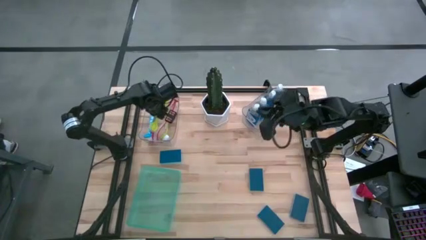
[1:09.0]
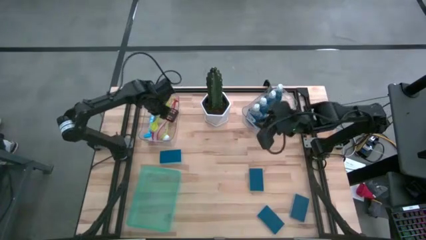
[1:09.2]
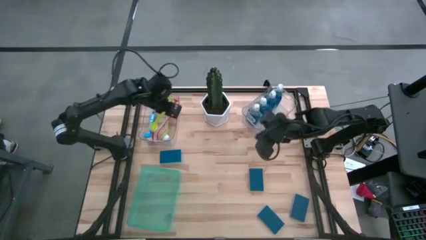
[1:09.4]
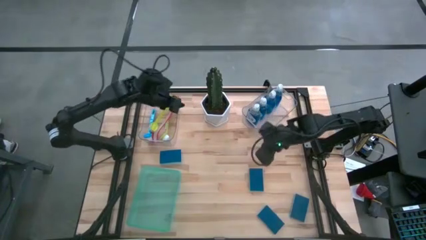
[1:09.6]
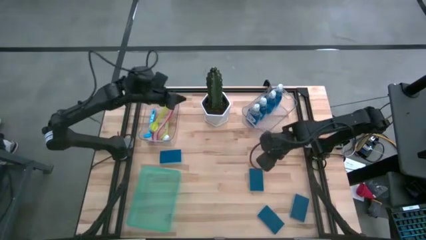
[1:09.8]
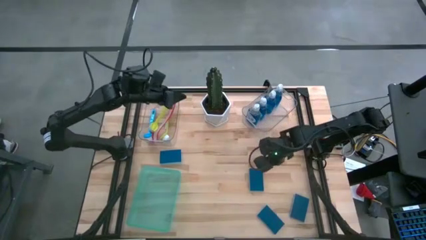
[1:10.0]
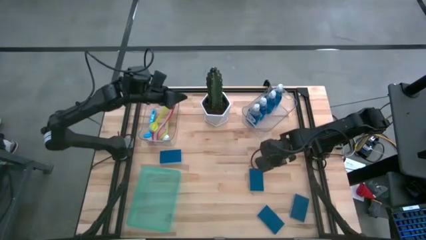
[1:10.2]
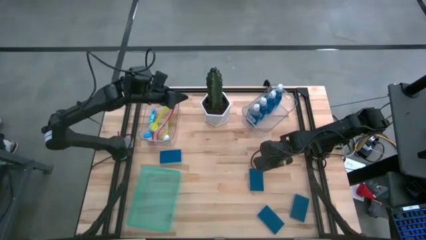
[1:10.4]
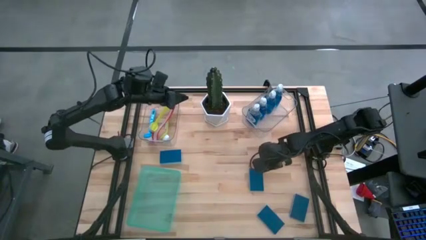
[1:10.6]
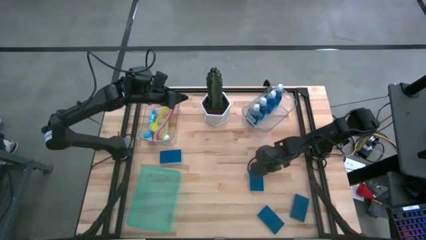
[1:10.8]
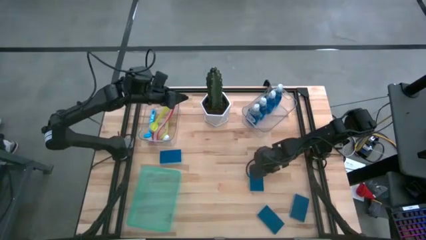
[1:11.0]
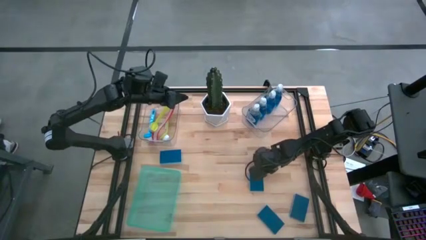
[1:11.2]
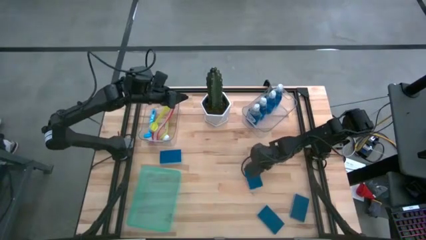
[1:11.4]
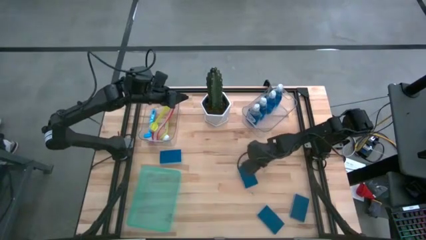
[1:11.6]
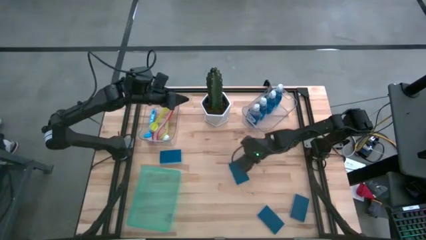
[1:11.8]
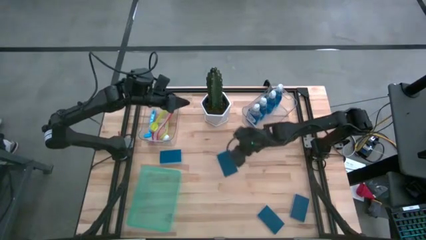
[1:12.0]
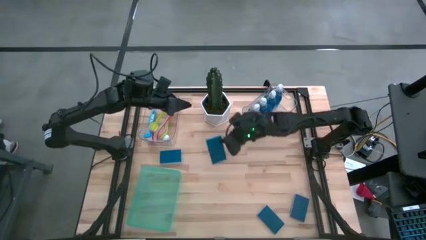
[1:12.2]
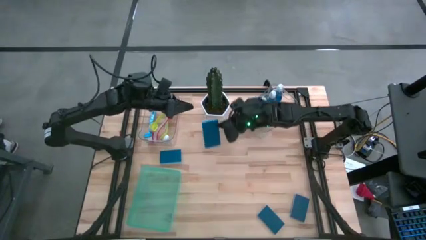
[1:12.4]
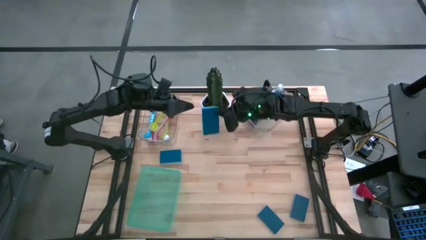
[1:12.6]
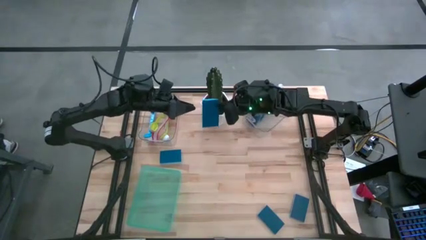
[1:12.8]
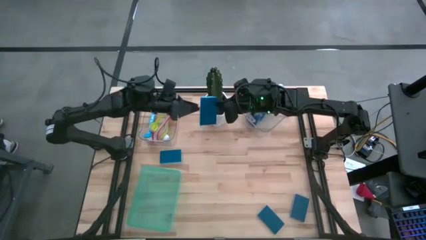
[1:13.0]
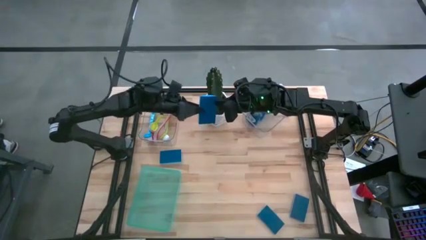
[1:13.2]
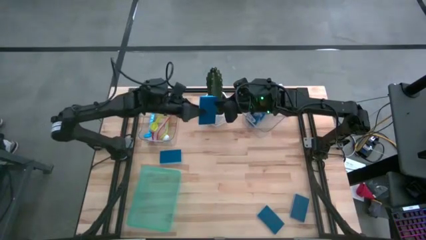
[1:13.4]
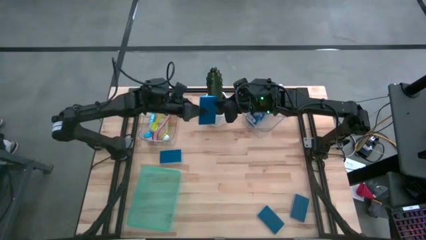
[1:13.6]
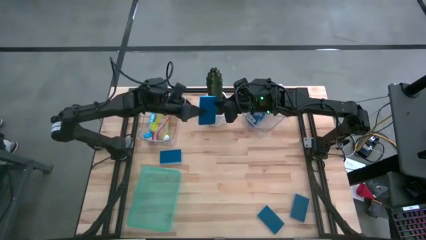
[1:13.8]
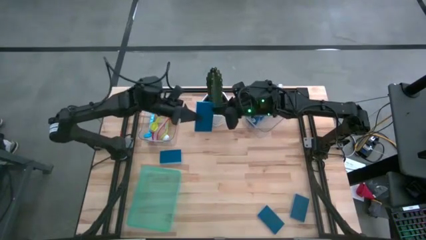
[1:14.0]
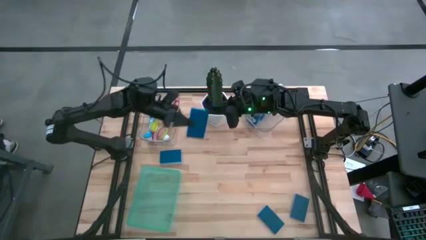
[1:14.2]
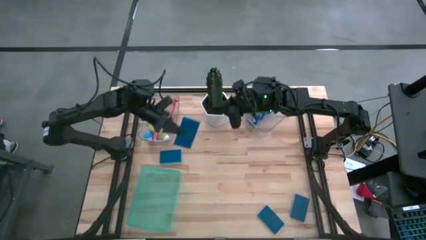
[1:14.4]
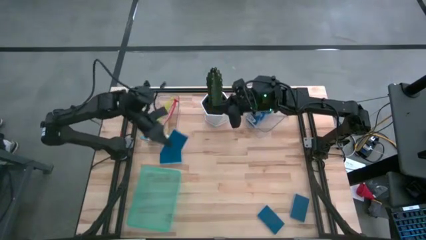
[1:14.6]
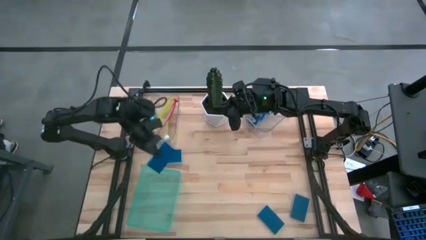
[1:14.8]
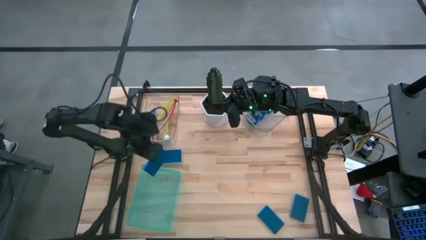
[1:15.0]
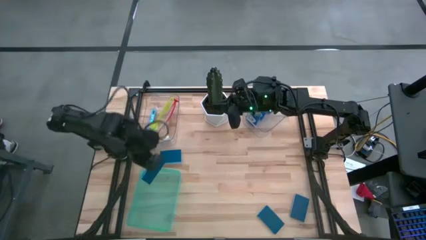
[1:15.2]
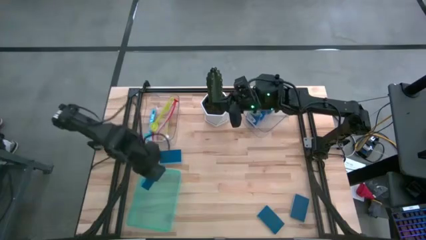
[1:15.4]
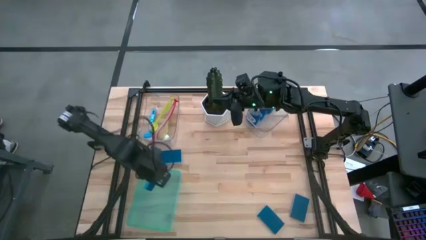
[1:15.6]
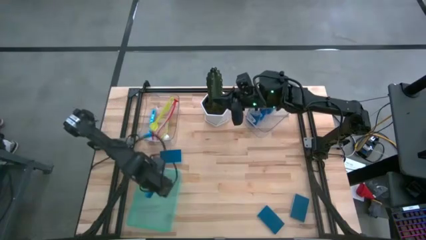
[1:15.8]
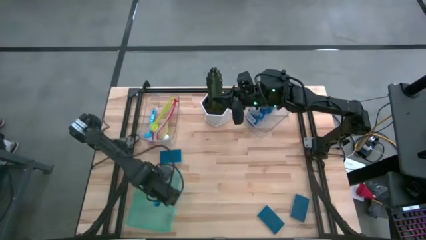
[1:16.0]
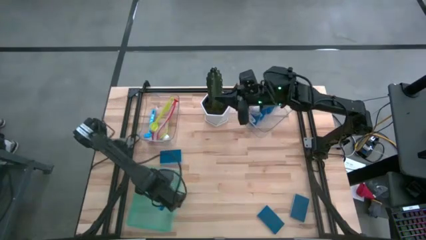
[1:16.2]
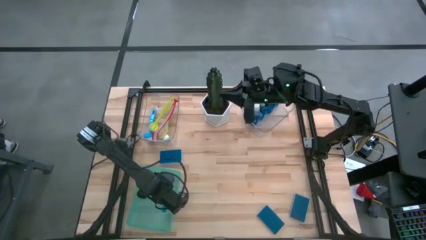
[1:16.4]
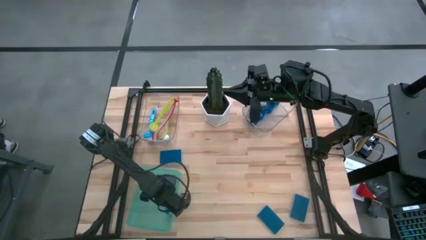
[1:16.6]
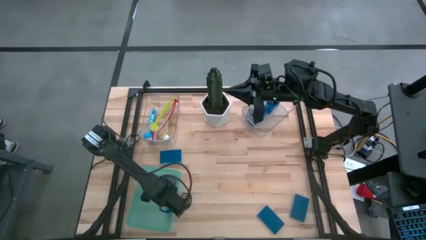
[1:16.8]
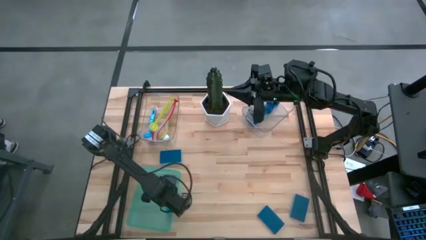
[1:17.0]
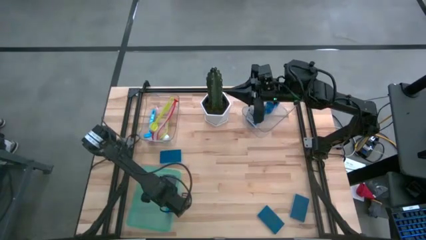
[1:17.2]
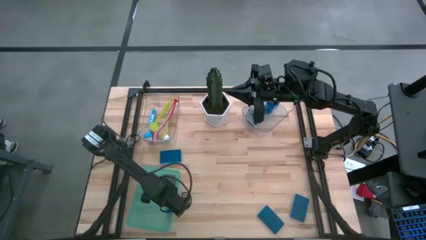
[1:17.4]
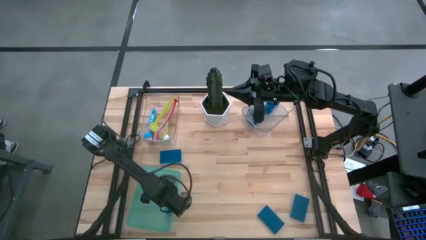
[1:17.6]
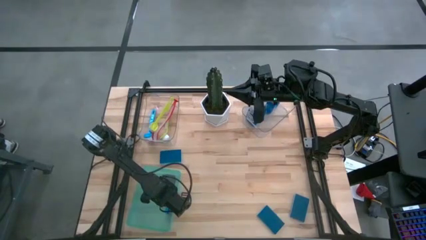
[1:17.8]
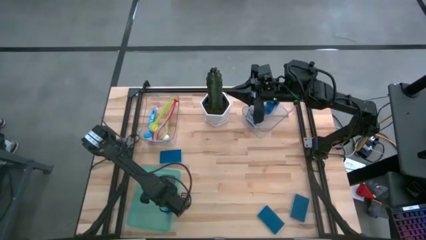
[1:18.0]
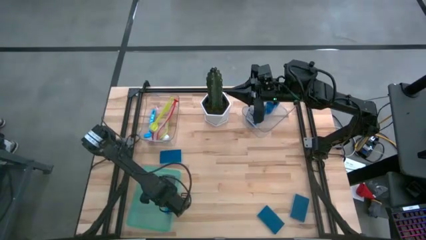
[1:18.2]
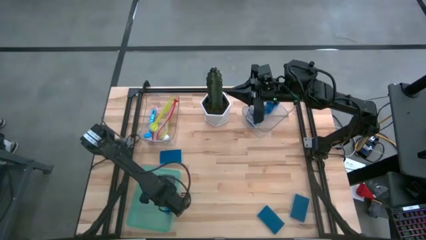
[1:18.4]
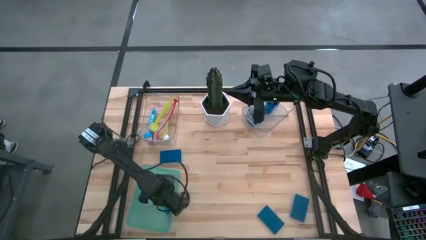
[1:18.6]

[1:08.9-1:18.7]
Task: Pick & Place Kitchen Sink Supplies
Put the sponge into the green bin

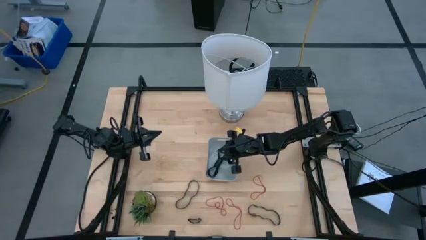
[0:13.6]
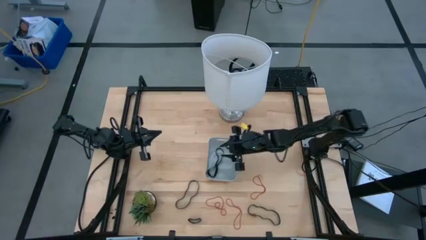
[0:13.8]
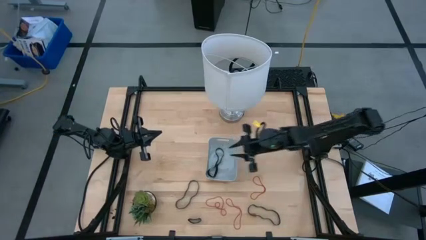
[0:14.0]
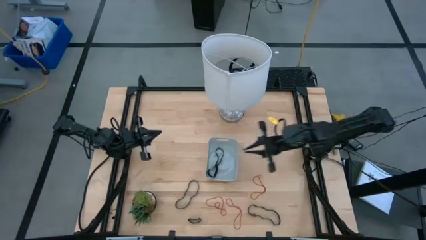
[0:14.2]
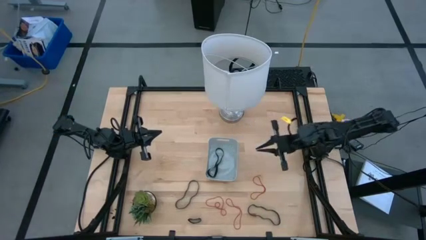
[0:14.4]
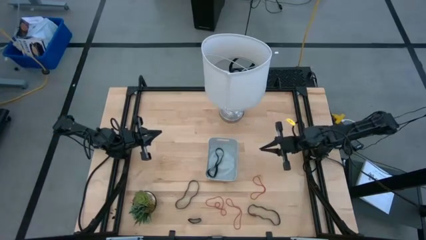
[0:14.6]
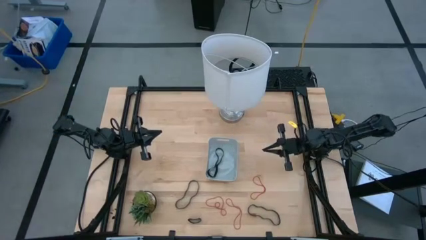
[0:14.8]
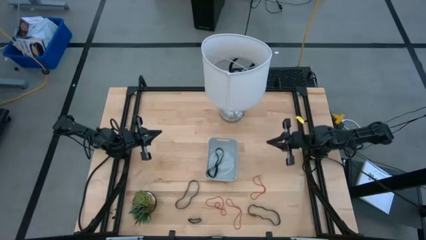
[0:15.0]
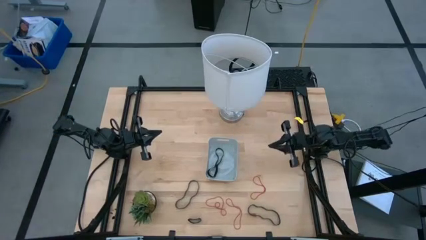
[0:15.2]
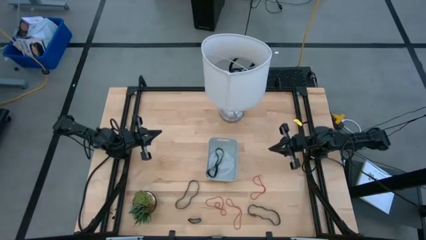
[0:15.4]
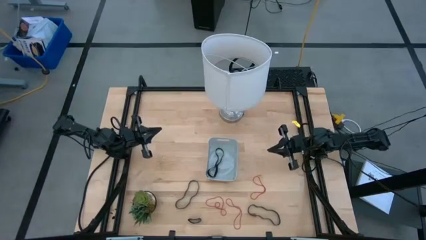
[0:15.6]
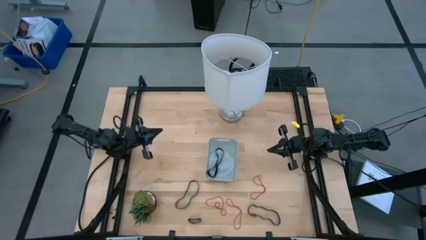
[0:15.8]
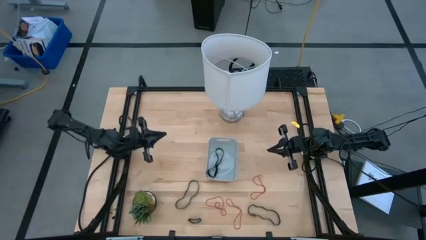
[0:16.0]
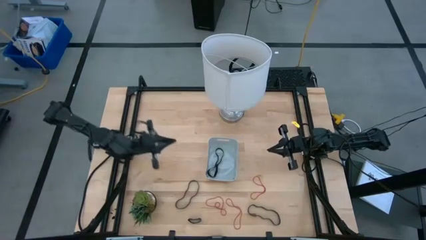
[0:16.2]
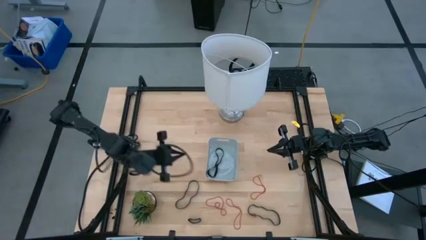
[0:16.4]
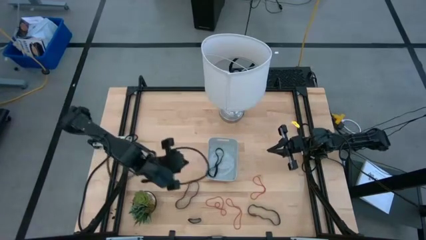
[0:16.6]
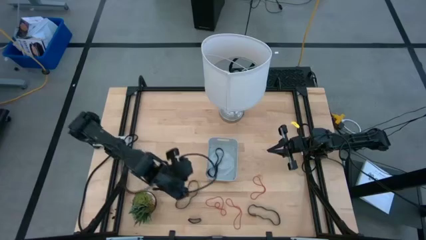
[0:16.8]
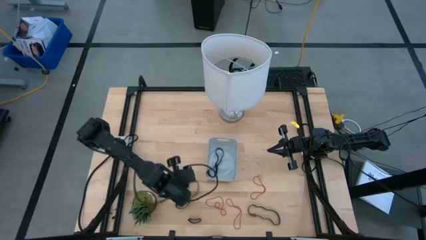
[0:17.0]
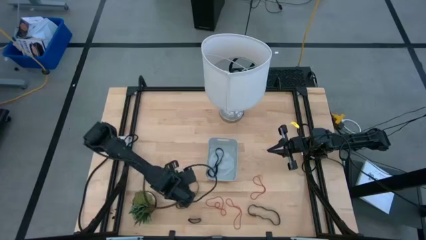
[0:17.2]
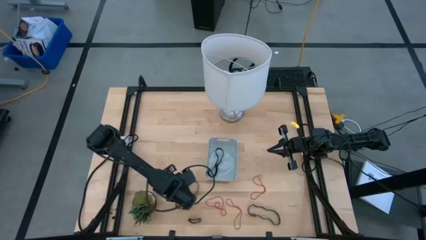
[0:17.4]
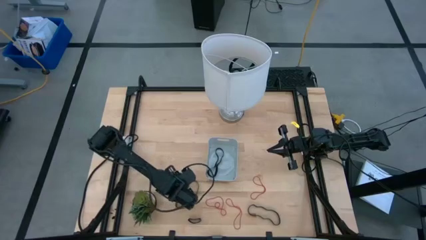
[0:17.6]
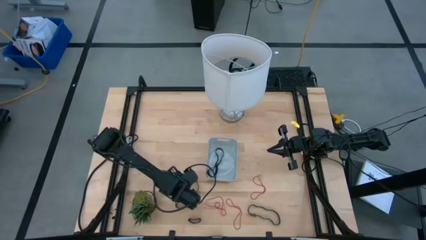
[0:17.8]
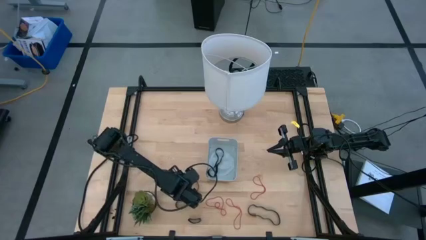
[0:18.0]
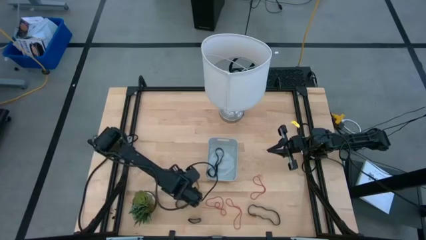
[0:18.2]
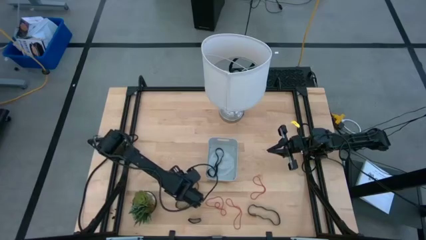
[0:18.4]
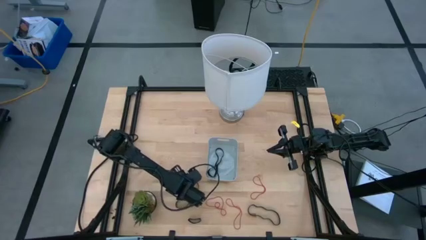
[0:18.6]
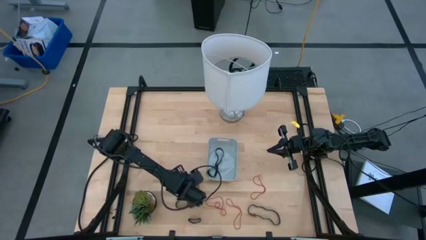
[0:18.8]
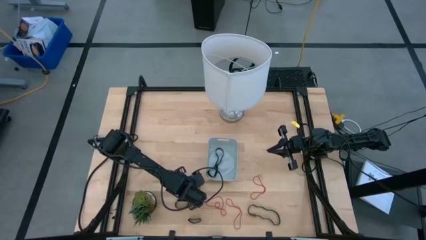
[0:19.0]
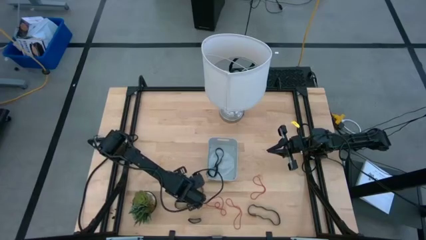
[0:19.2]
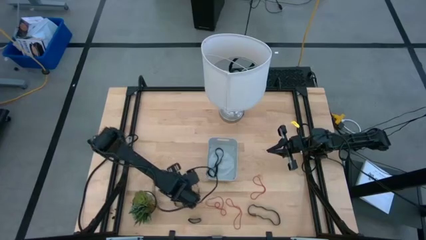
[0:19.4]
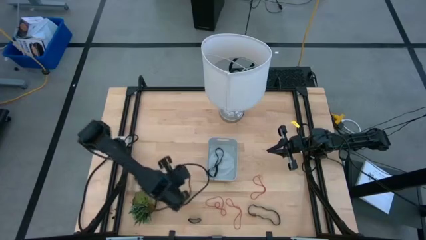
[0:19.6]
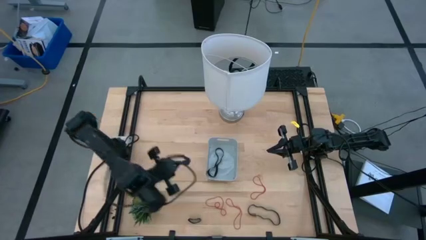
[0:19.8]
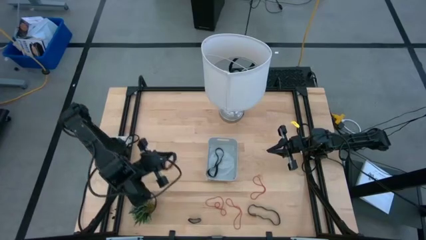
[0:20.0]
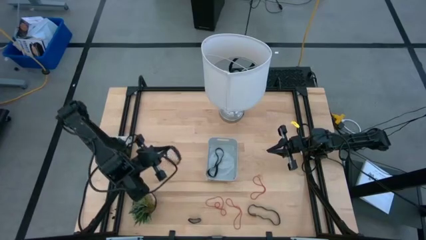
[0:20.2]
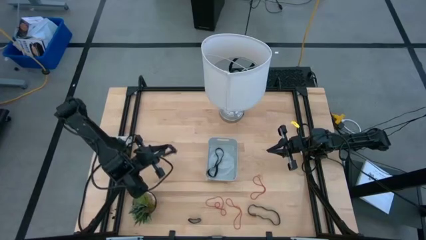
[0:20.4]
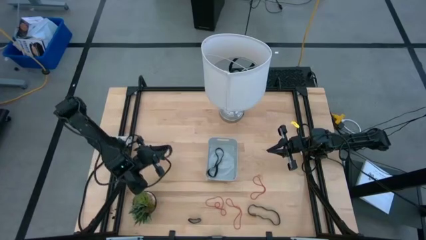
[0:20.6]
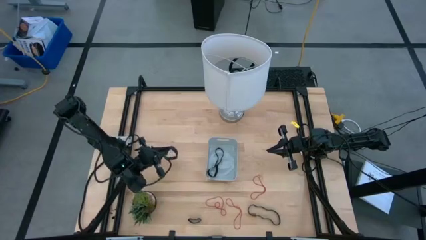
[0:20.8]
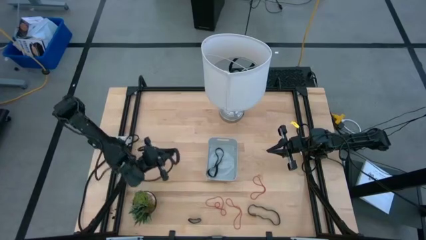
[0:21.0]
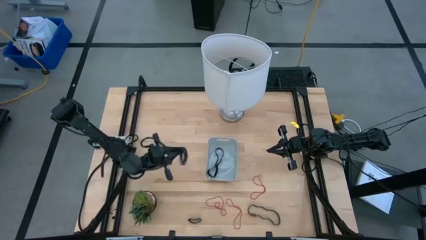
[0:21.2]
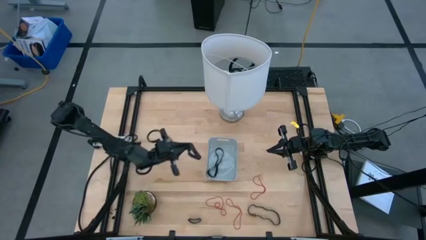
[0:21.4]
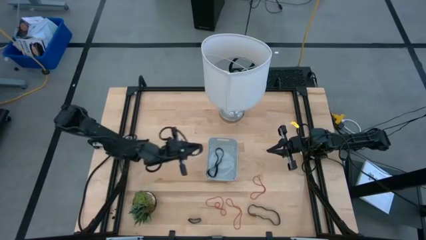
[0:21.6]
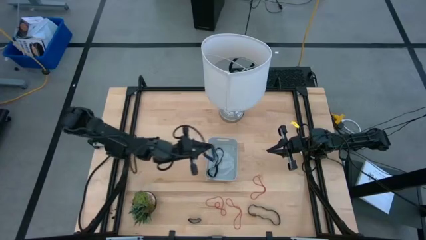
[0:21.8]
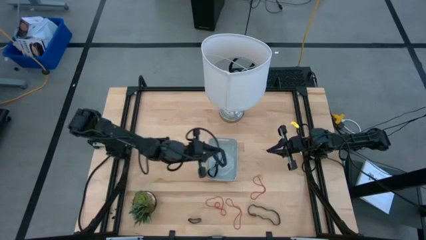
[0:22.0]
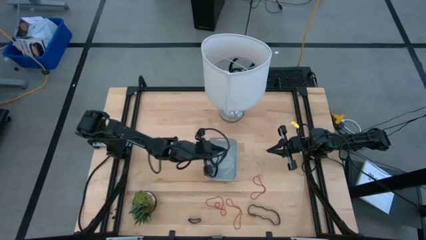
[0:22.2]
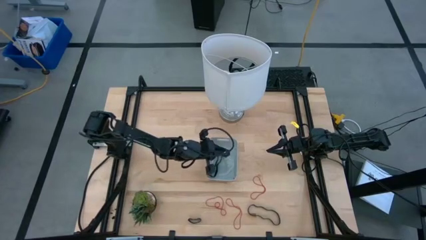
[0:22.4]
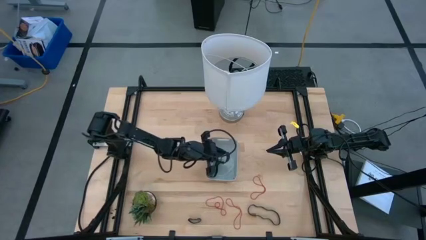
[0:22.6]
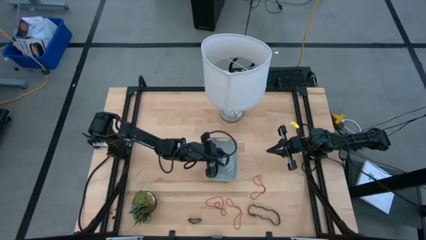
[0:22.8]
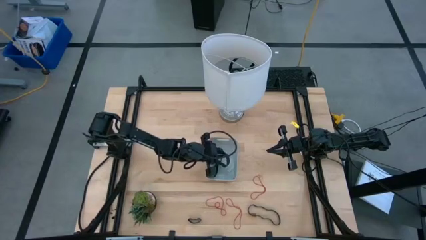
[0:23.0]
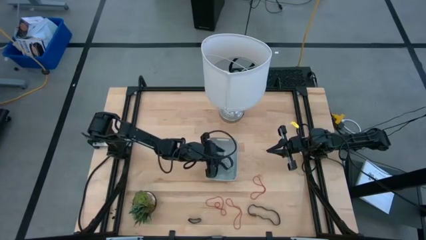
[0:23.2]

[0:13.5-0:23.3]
Task: Pick and place rubber bands into bin
Put the black rubber band into the gray bin
